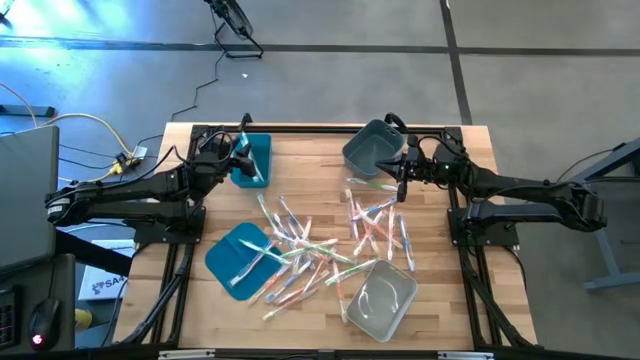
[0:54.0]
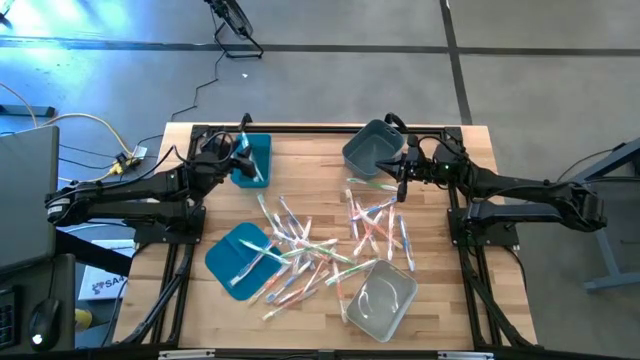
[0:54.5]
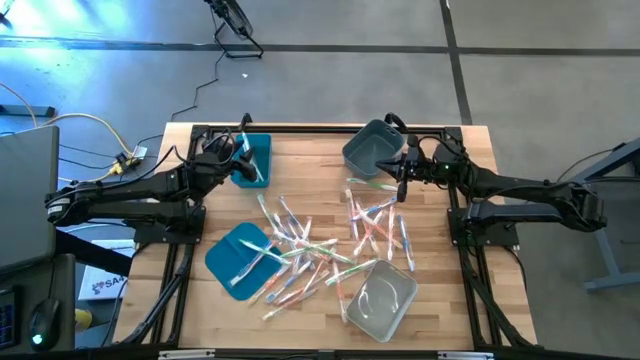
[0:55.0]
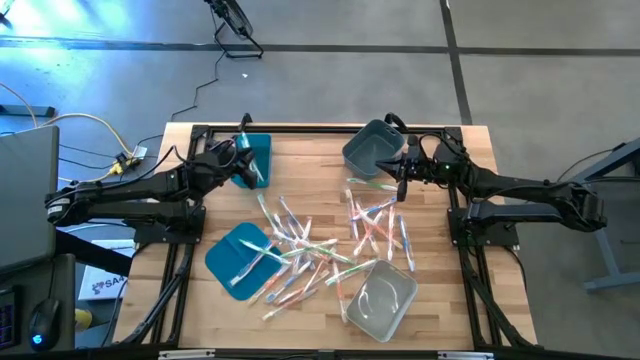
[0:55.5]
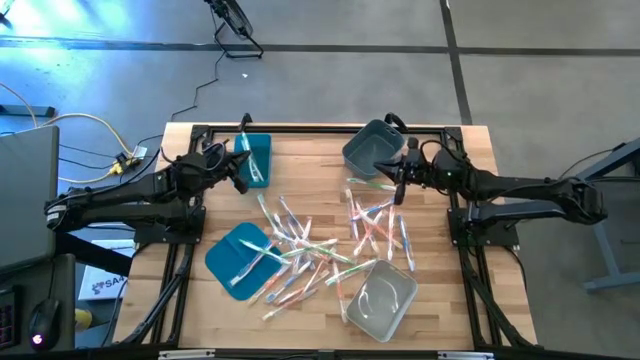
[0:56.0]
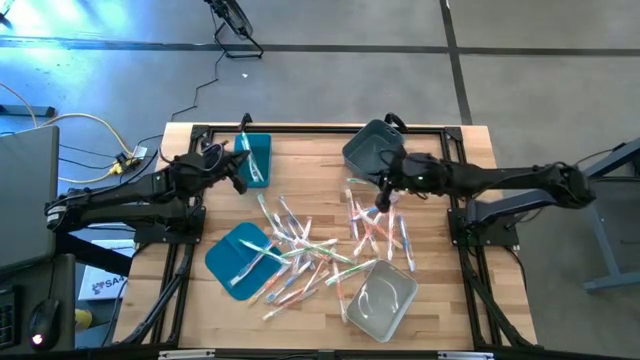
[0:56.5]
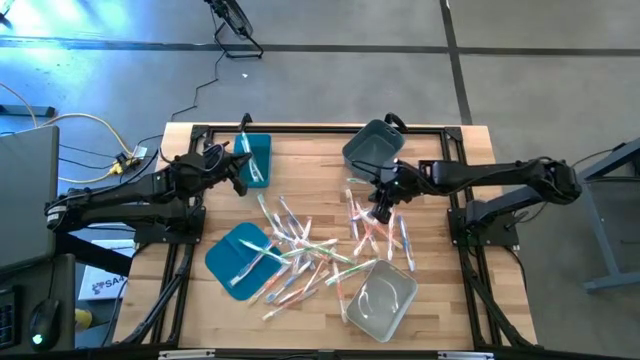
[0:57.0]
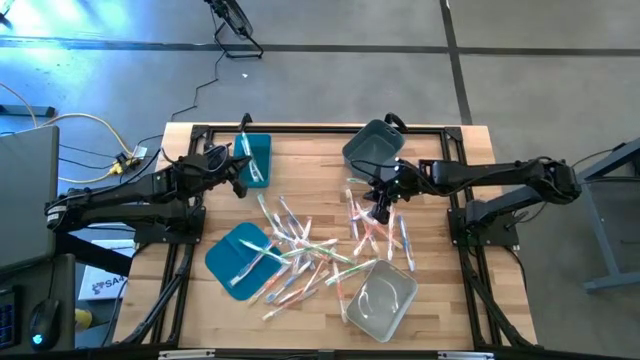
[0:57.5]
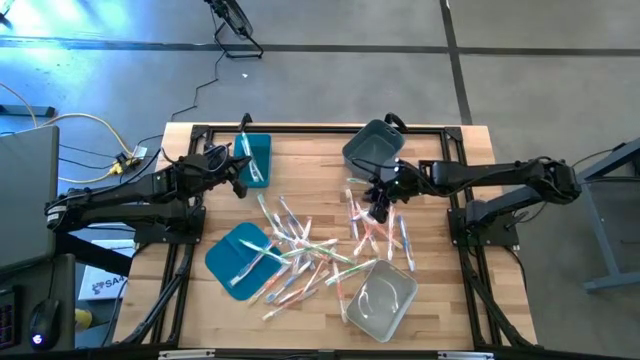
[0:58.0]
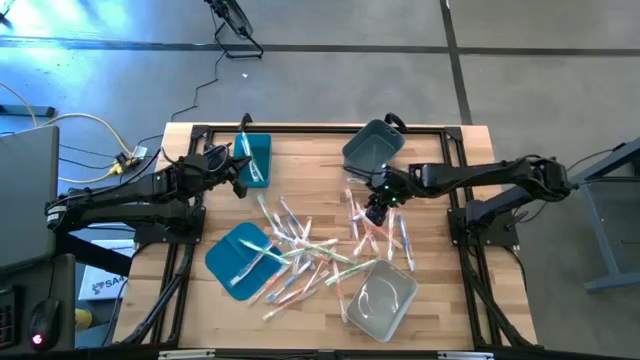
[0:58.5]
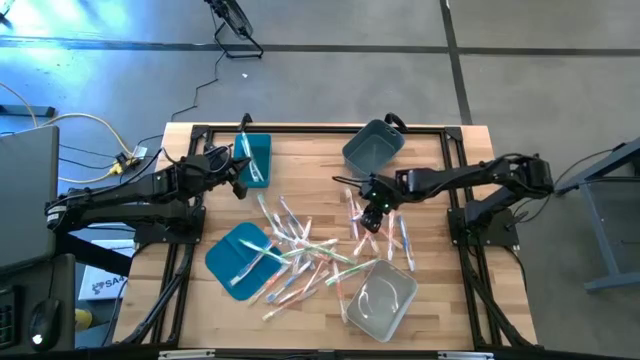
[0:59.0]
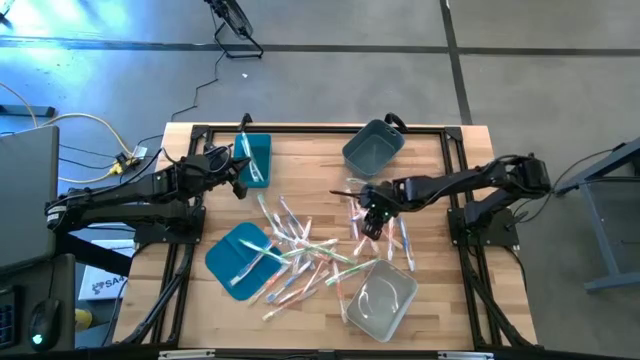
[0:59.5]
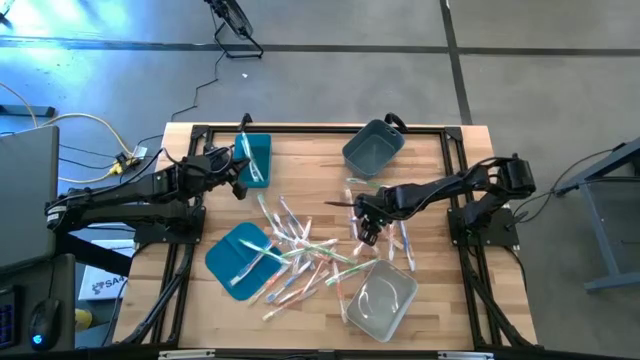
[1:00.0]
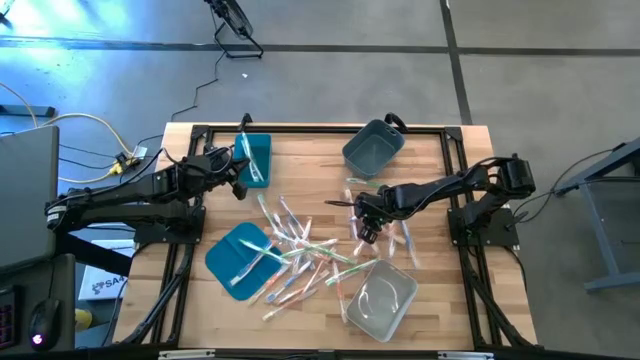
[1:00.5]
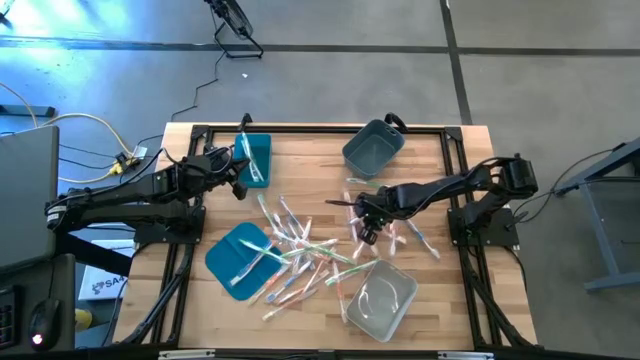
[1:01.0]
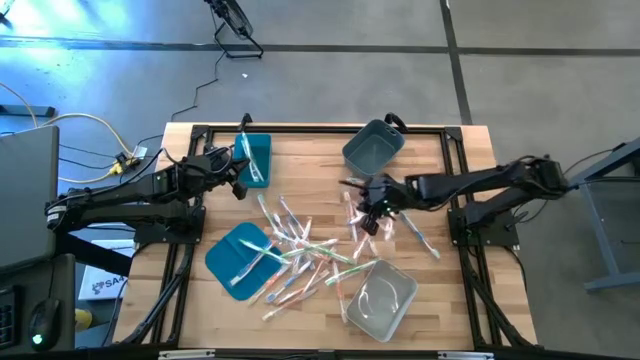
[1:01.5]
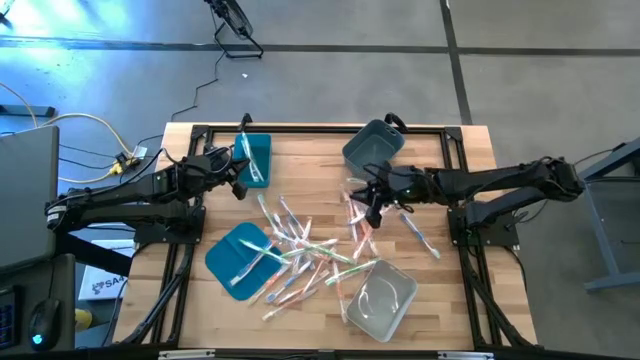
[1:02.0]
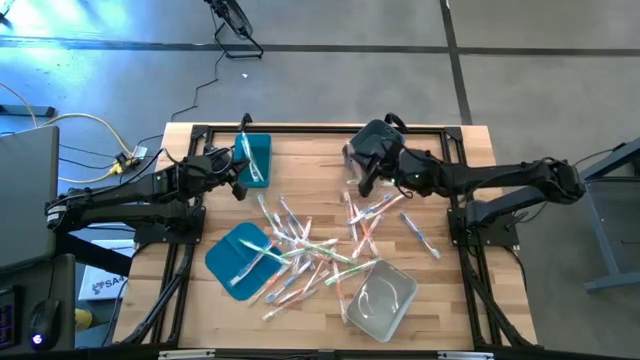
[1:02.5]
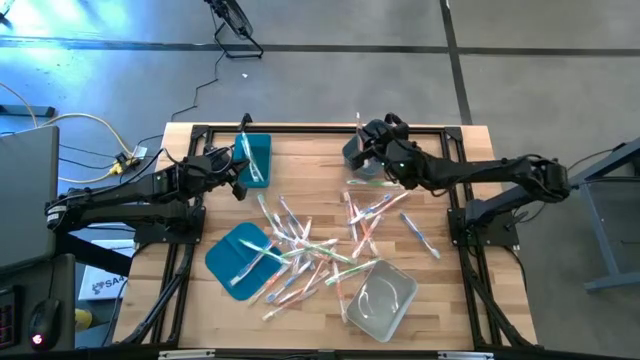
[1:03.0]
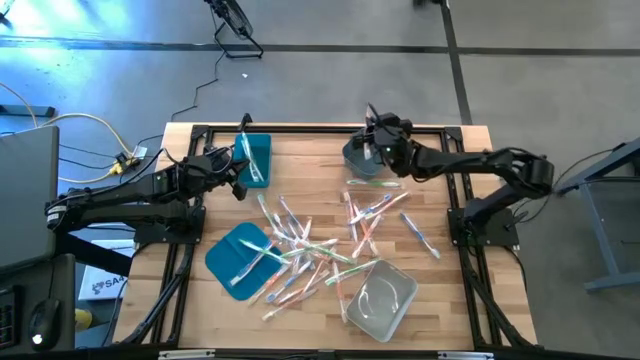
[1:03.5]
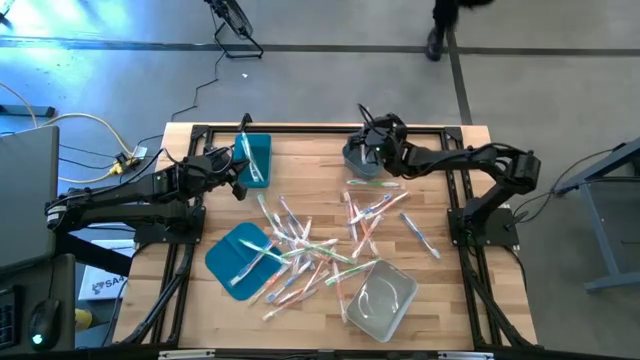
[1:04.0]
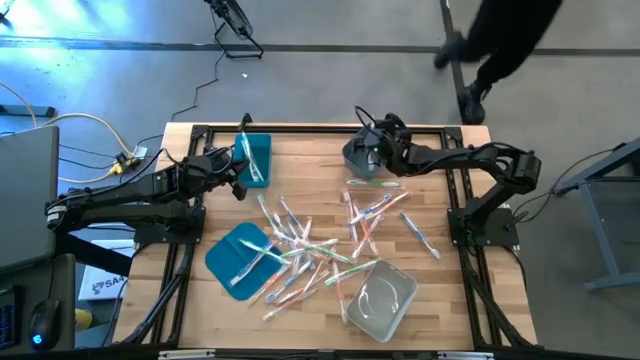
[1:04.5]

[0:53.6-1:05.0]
Task: Pick & Place Toothbrushes
Put the orange toothbrush into the dark gray bin

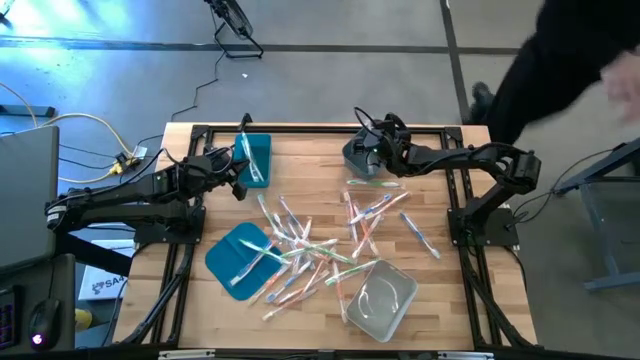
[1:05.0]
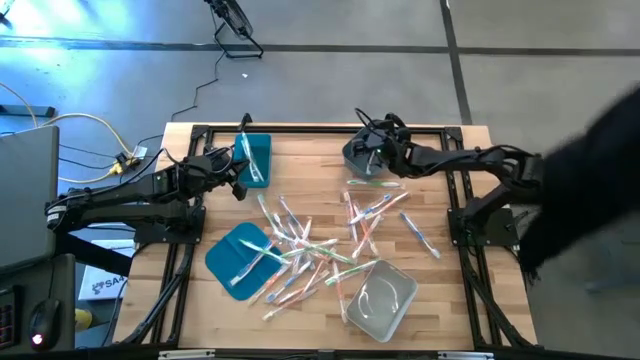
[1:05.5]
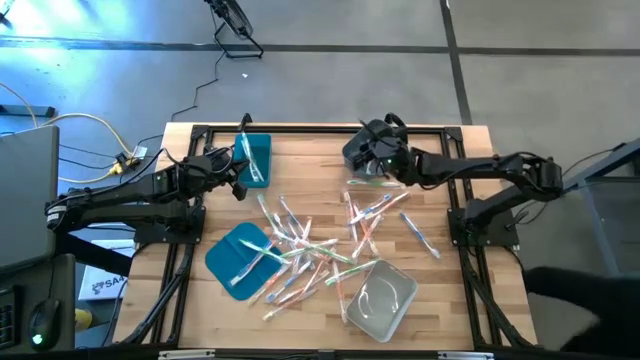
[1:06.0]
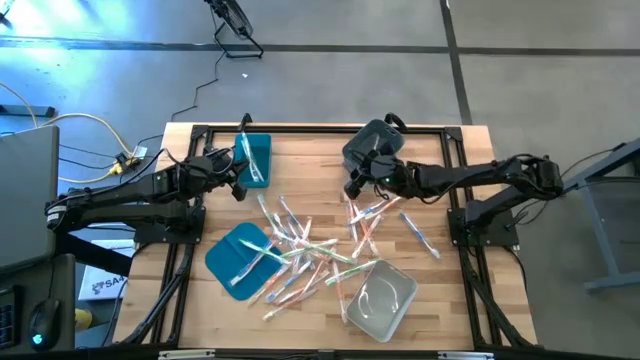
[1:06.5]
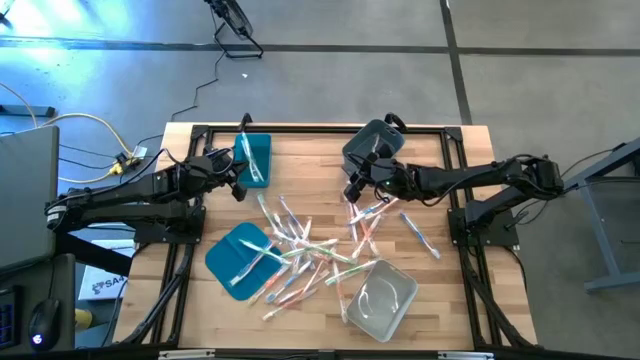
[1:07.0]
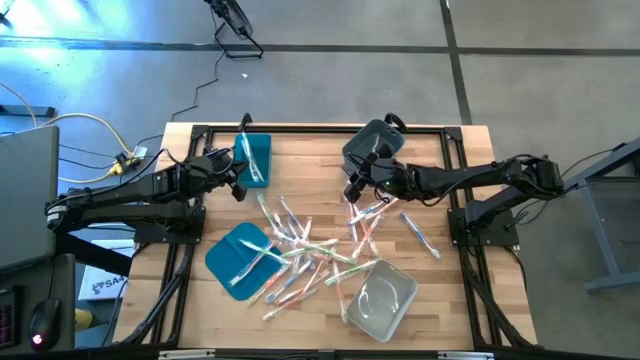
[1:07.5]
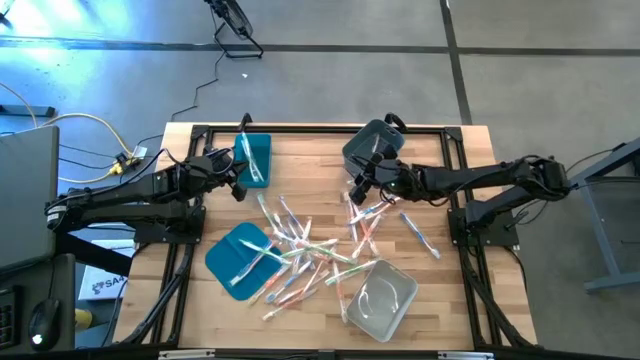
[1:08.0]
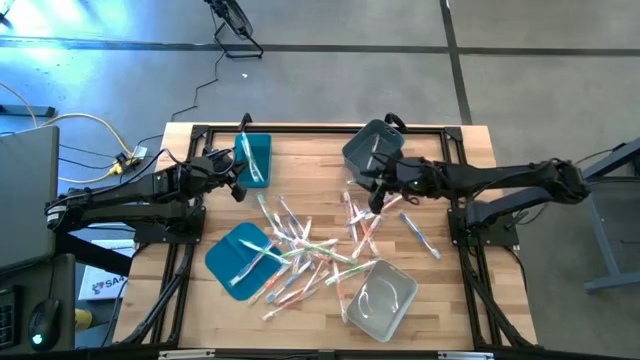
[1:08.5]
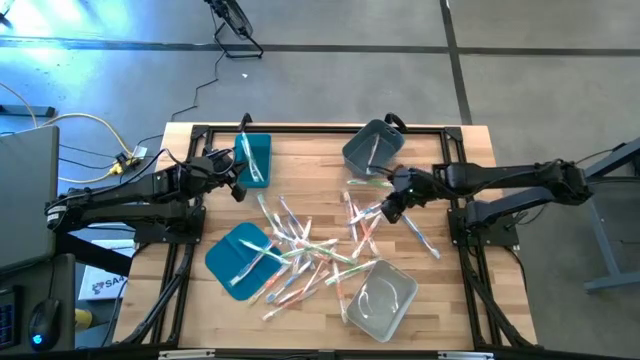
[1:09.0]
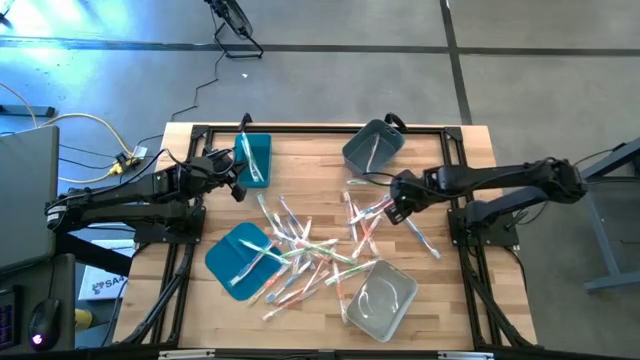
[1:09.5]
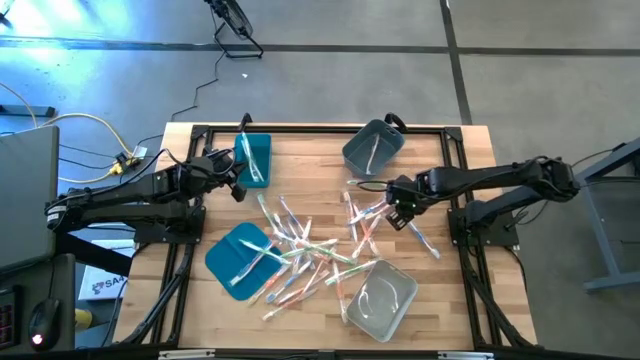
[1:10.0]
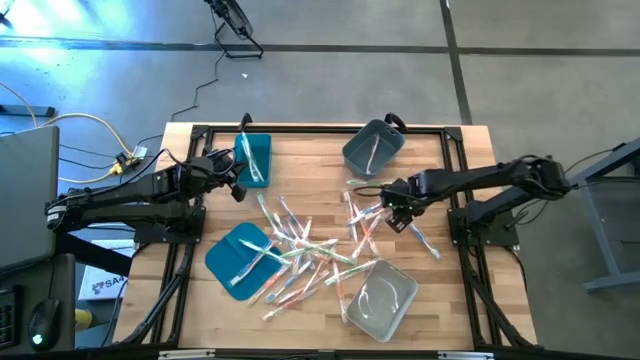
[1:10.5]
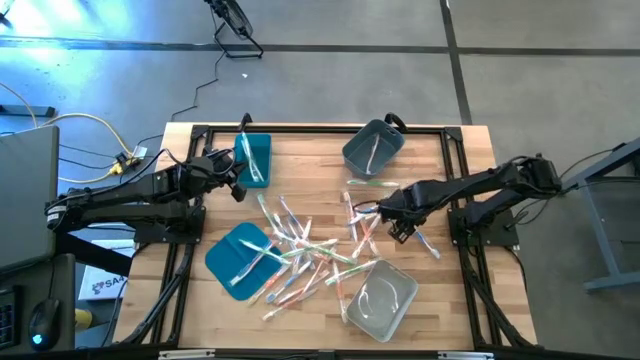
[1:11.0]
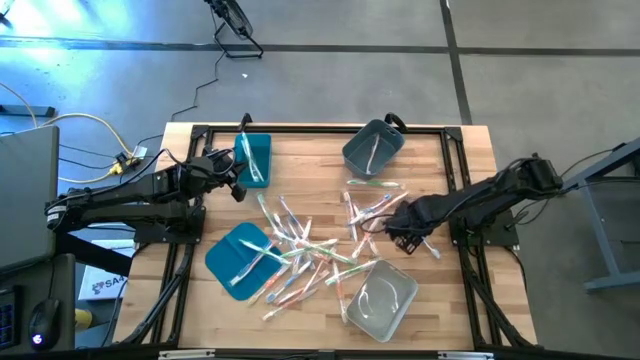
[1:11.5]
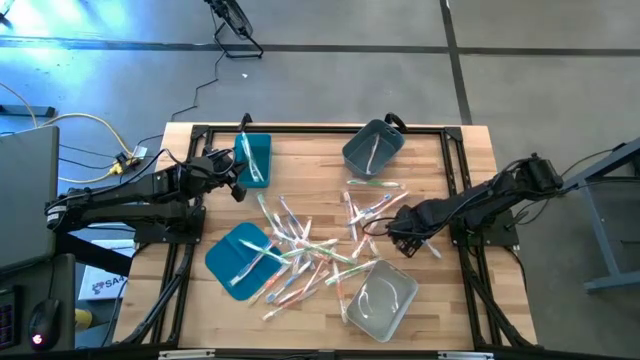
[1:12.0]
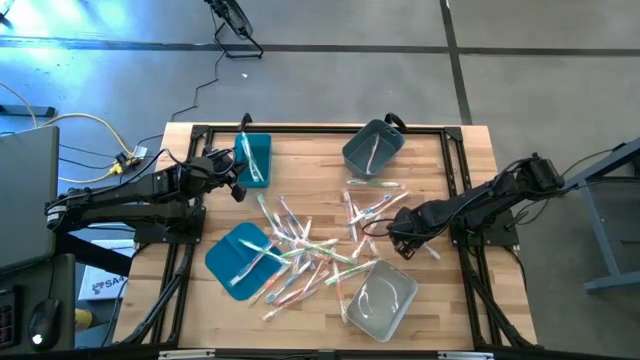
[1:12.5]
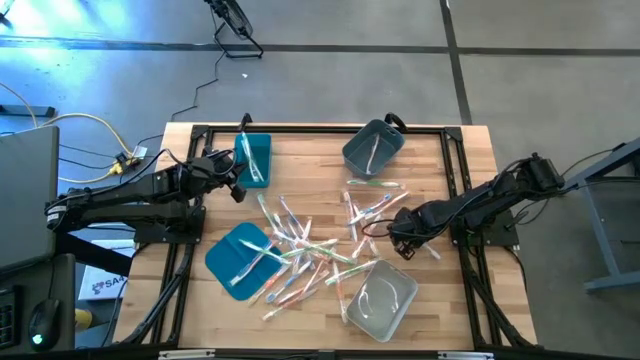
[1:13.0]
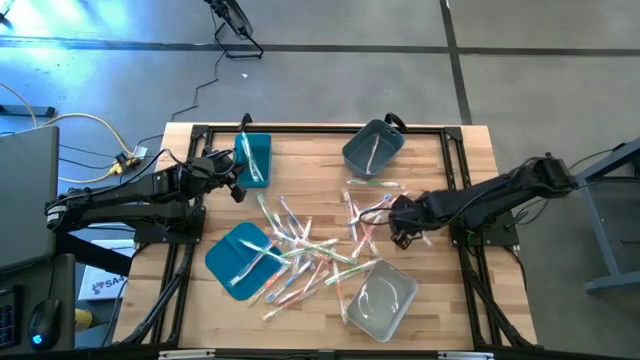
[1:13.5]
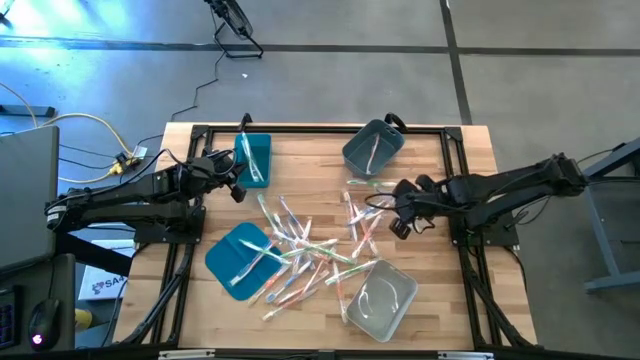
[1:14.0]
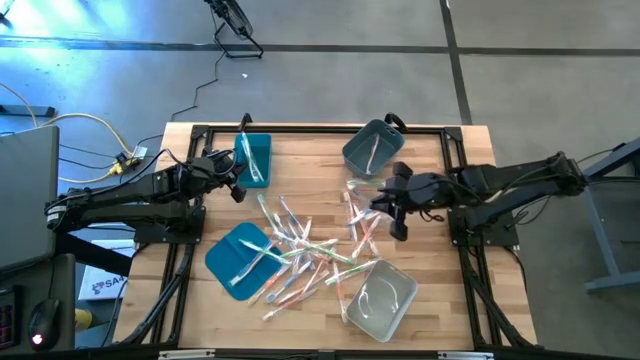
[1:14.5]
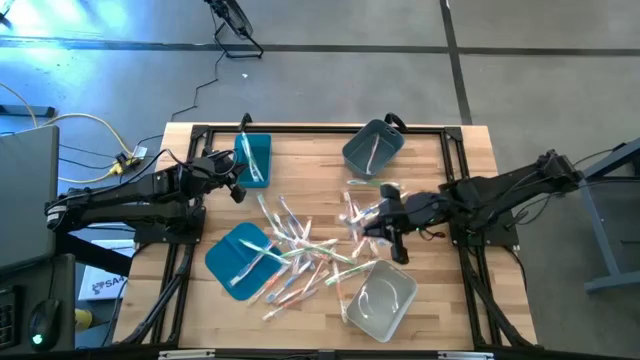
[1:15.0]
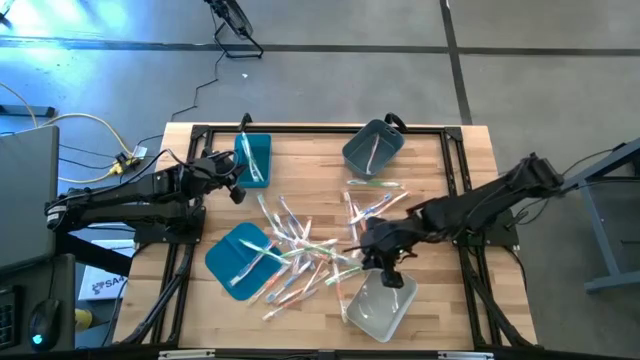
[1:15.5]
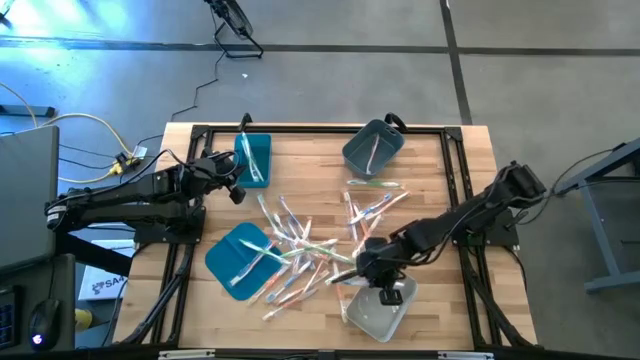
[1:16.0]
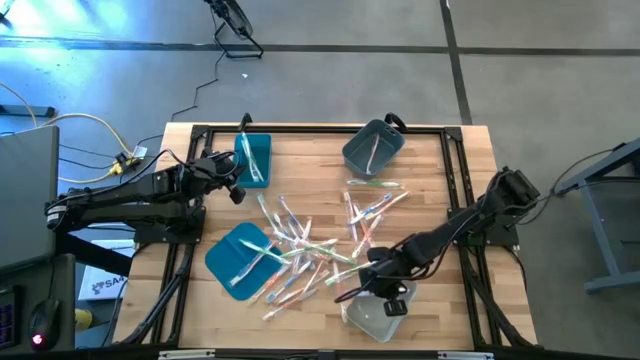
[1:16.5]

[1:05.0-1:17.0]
Put the blue toothbrush into the light gray bin
